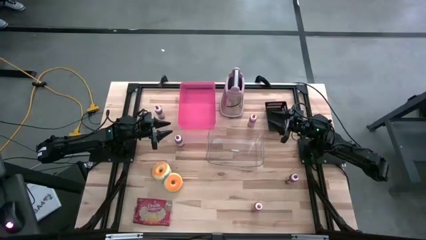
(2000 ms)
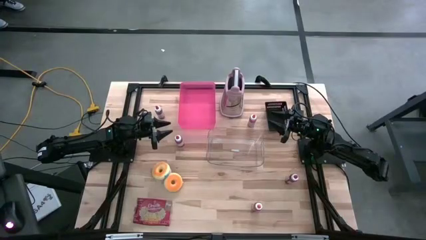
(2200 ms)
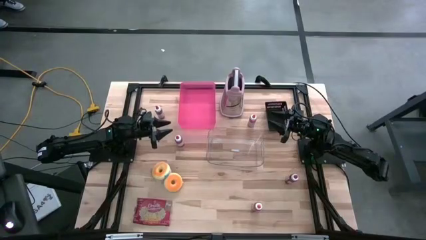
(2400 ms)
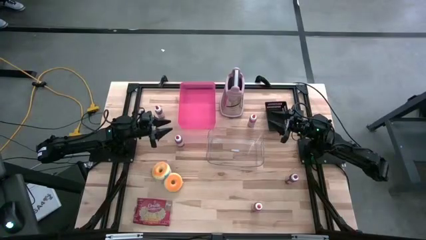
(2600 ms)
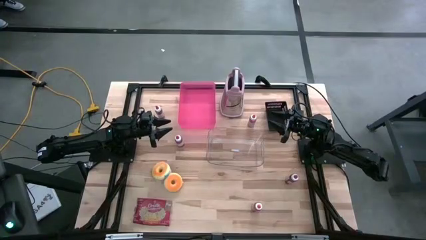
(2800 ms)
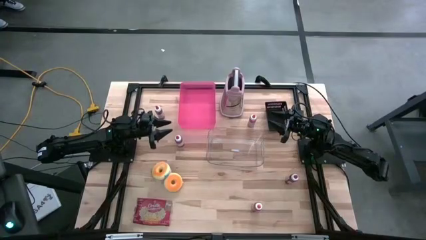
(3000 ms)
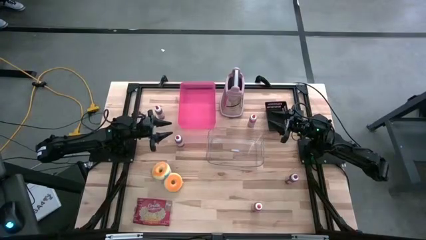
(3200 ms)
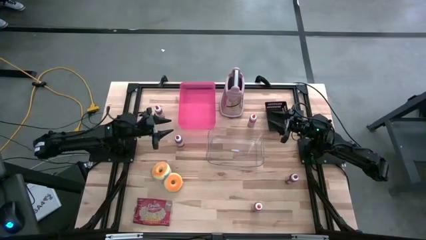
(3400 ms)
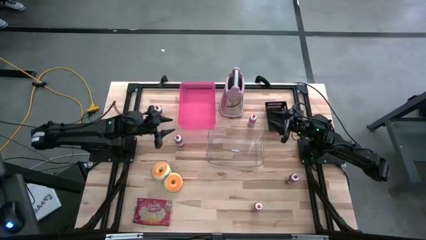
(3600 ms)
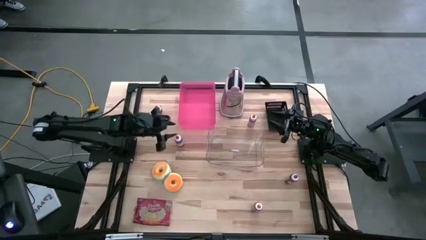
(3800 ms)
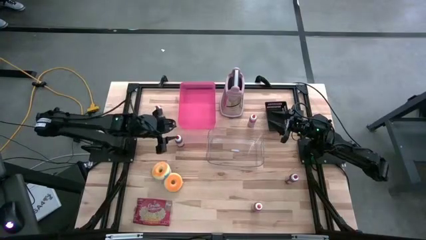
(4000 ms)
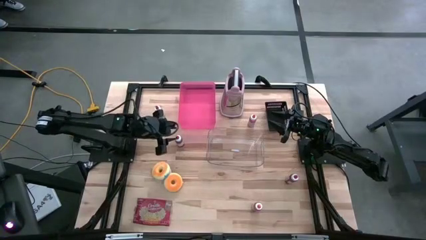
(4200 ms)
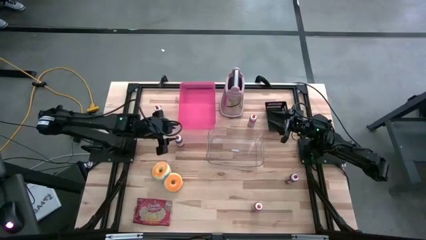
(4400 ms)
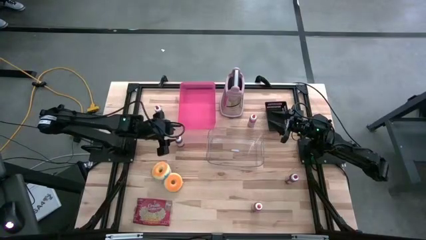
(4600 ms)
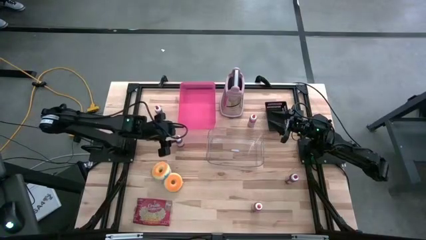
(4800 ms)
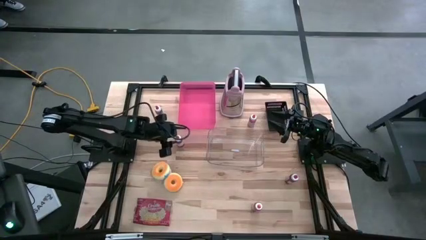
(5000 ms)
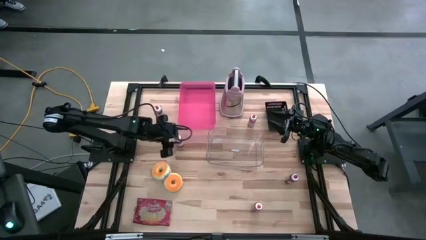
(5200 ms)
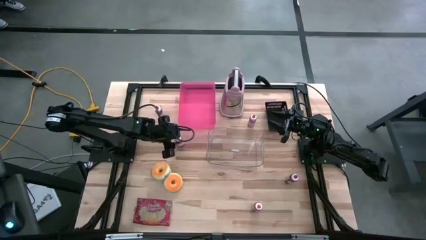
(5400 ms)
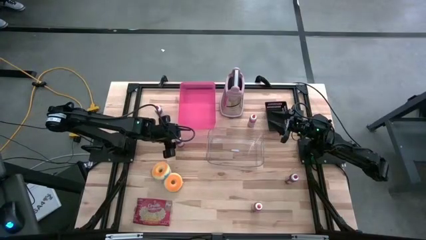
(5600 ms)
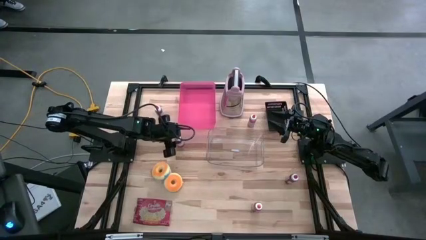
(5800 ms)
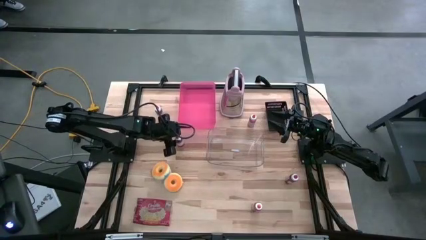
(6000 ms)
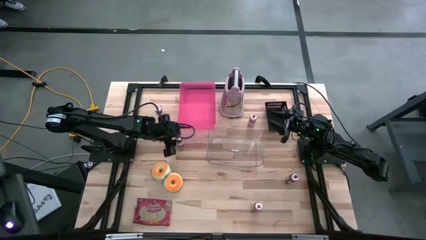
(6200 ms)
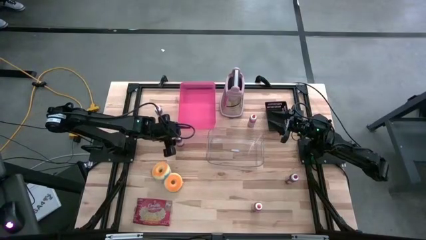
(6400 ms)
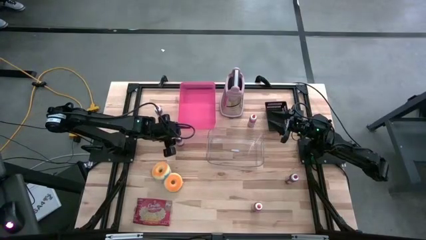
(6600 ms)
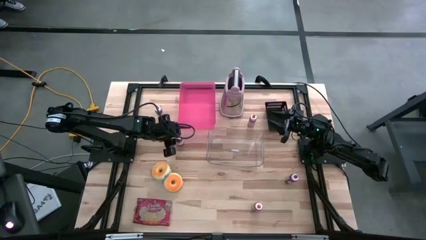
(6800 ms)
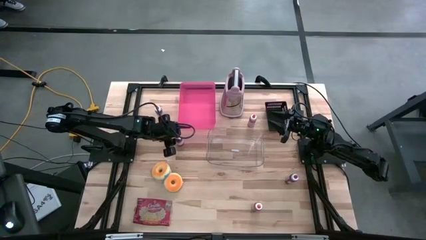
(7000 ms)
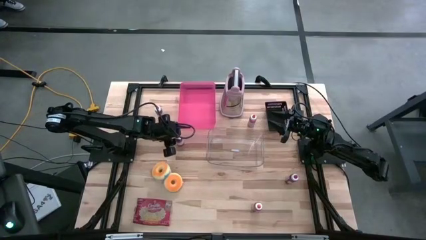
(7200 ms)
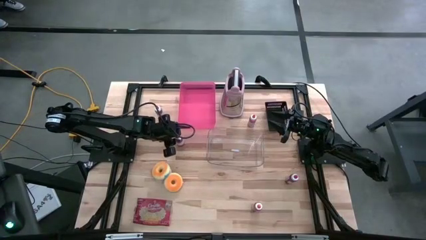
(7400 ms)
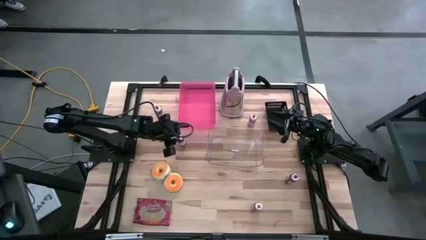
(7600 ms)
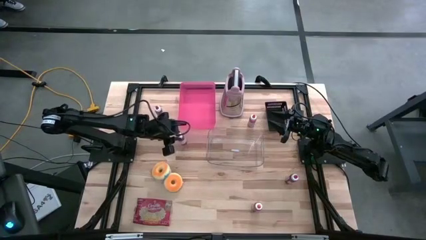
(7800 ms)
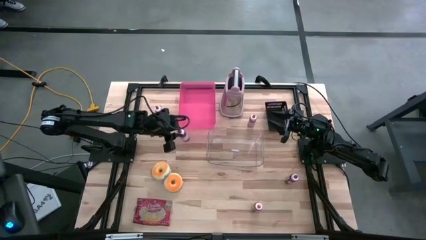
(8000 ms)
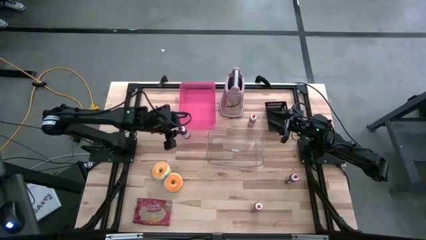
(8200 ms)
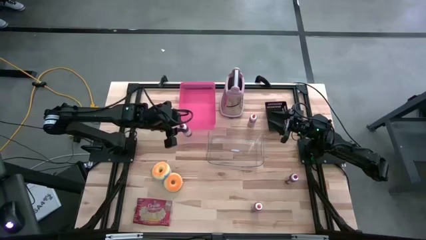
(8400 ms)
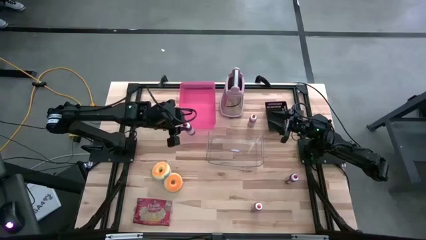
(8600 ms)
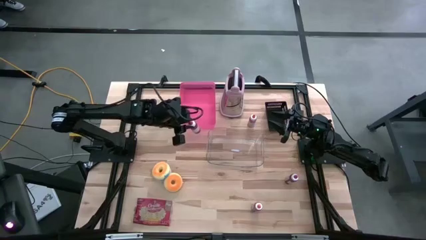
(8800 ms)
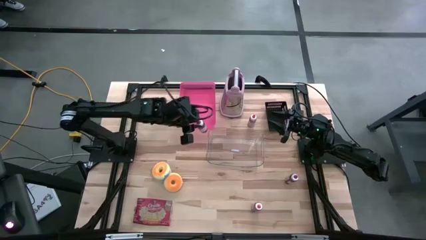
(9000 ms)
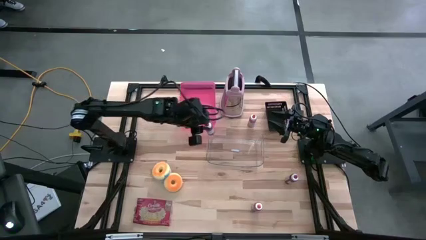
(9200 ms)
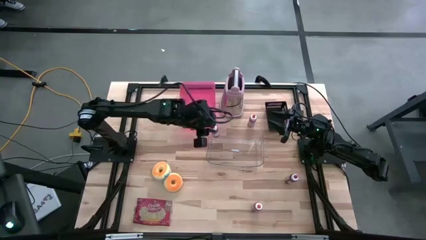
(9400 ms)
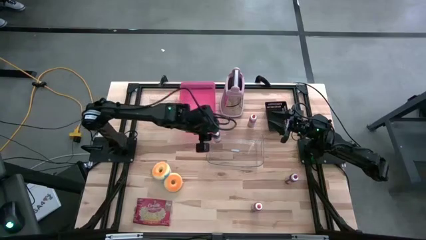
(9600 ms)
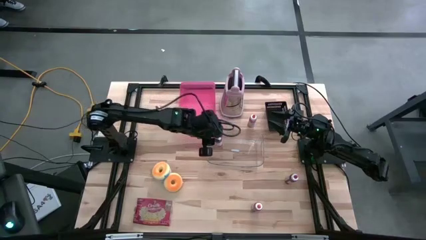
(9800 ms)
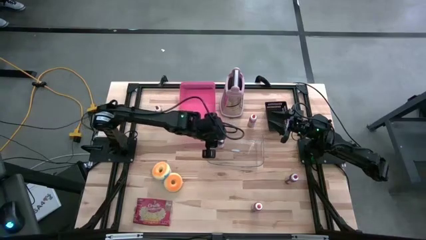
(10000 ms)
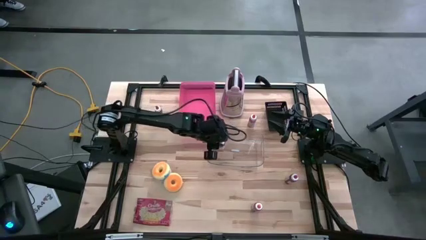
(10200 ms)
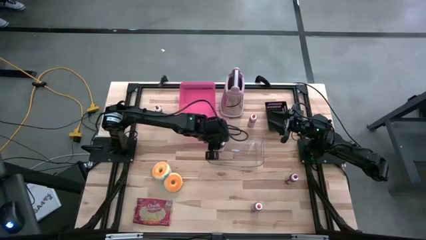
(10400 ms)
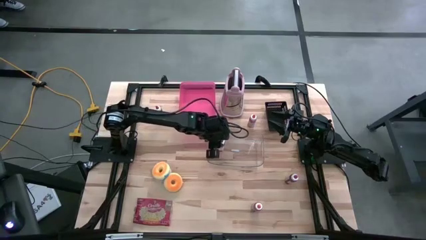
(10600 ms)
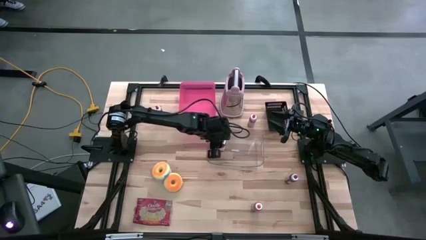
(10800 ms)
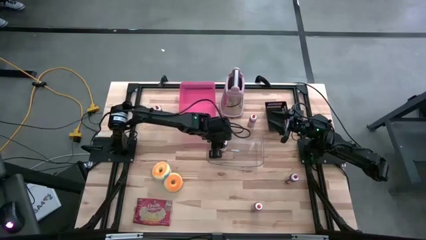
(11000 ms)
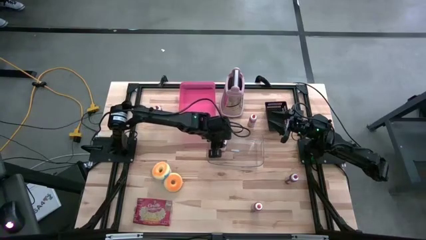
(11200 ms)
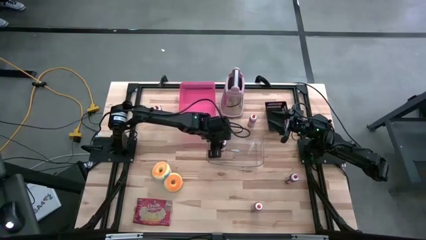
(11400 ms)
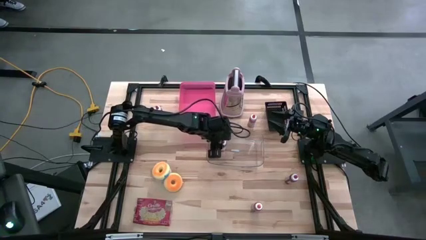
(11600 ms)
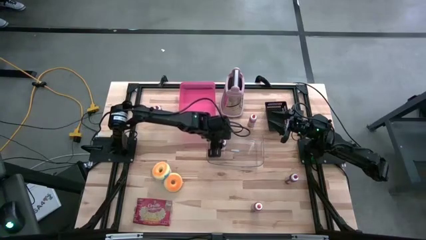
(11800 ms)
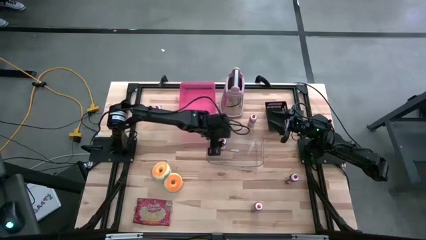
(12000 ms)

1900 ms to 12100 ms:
Put the middle red food coloring bottle into the transparent bin
